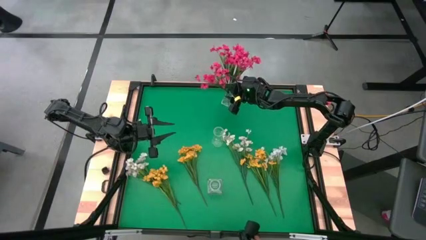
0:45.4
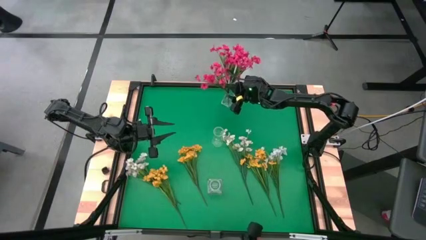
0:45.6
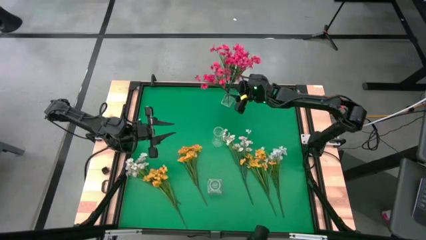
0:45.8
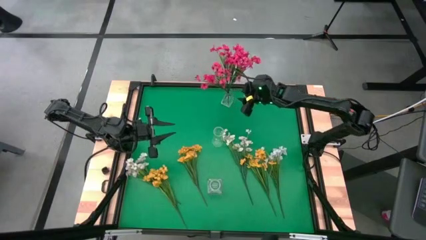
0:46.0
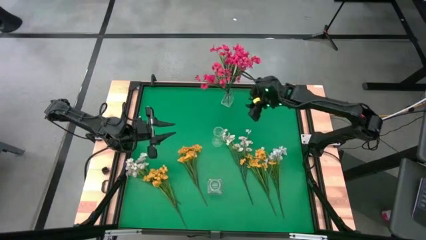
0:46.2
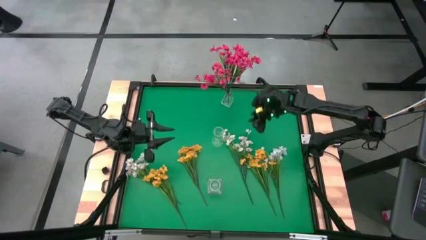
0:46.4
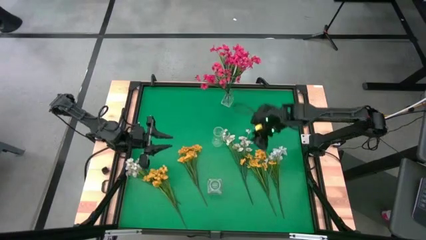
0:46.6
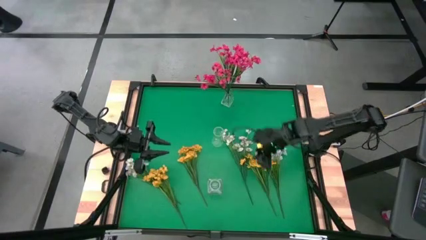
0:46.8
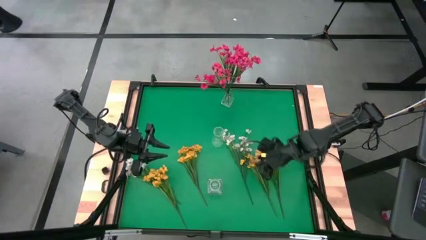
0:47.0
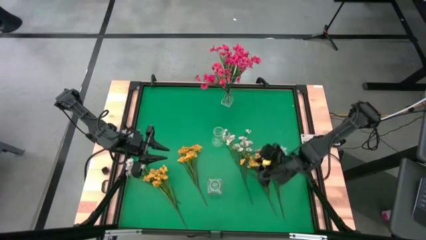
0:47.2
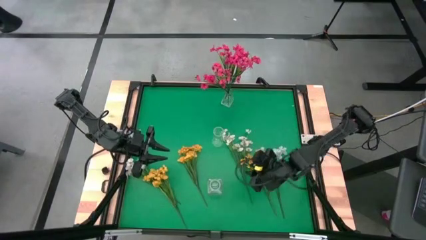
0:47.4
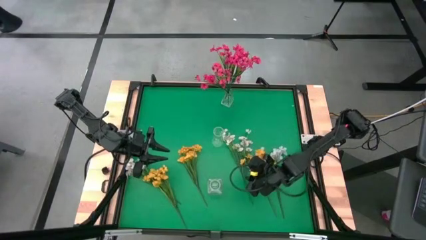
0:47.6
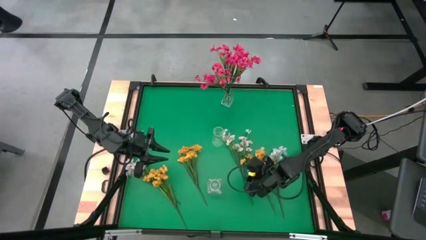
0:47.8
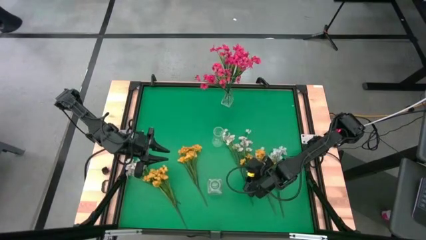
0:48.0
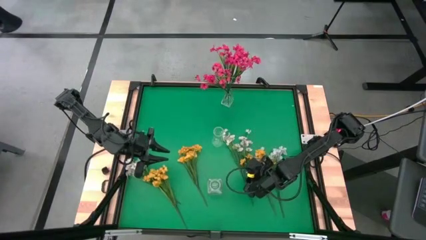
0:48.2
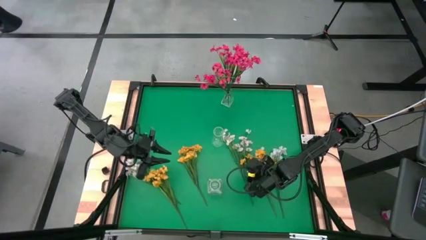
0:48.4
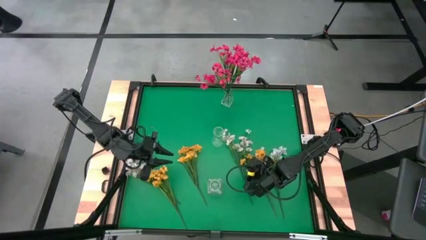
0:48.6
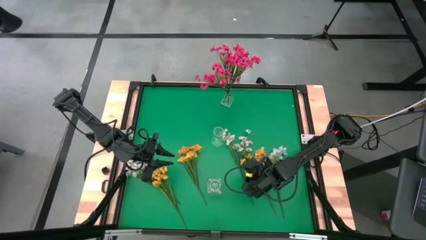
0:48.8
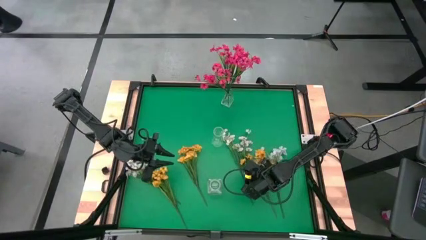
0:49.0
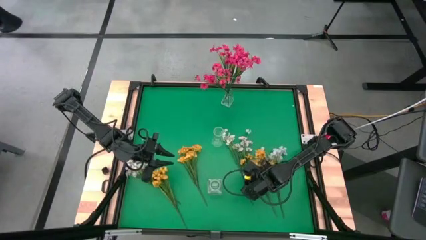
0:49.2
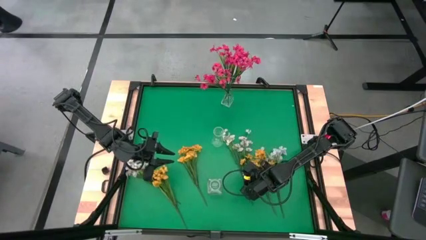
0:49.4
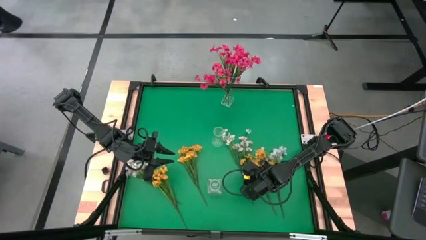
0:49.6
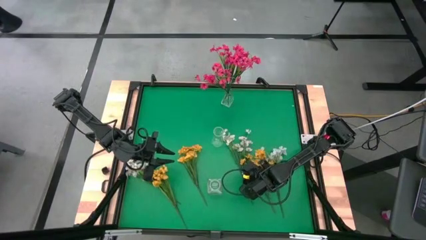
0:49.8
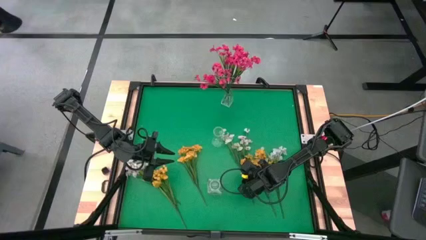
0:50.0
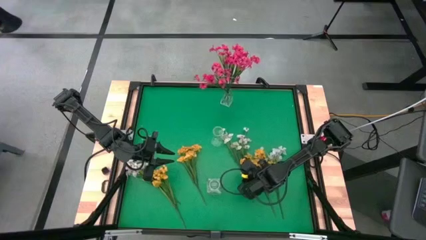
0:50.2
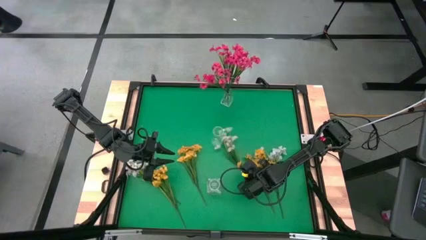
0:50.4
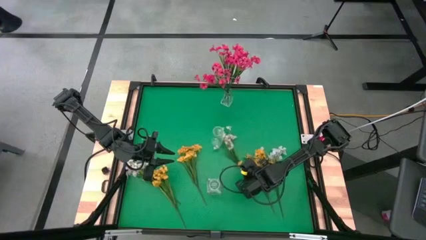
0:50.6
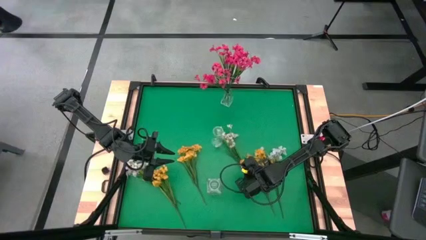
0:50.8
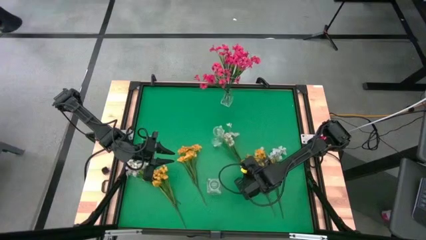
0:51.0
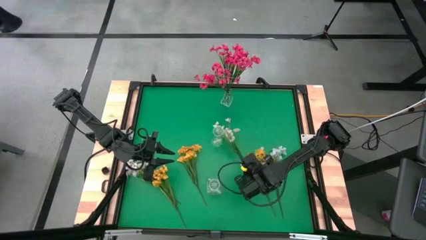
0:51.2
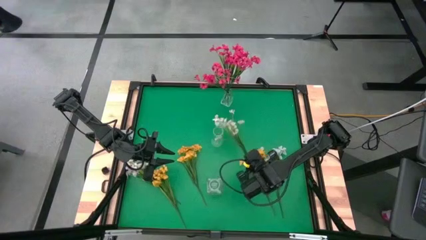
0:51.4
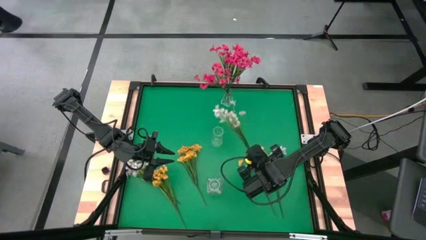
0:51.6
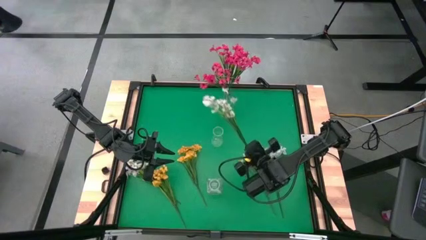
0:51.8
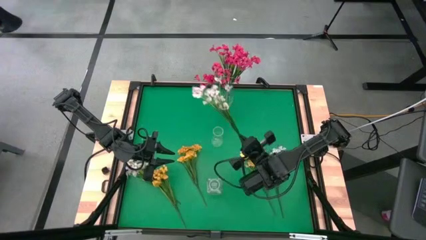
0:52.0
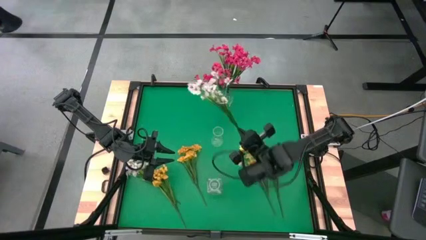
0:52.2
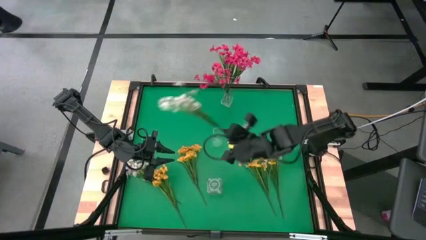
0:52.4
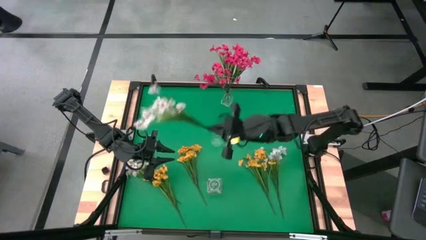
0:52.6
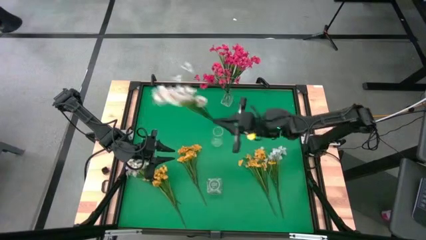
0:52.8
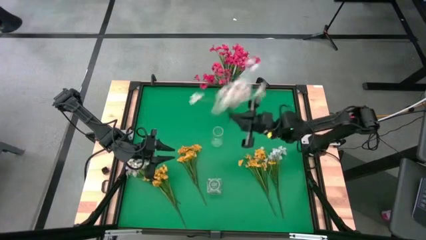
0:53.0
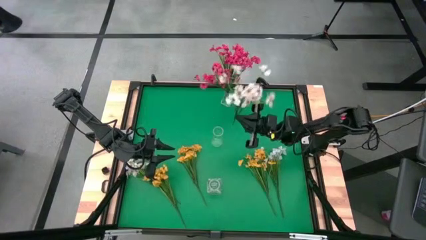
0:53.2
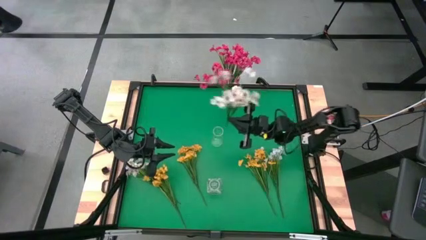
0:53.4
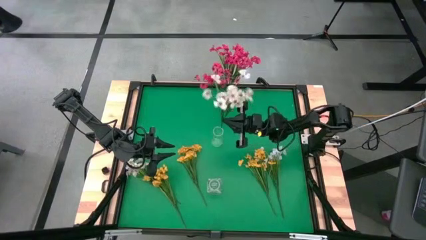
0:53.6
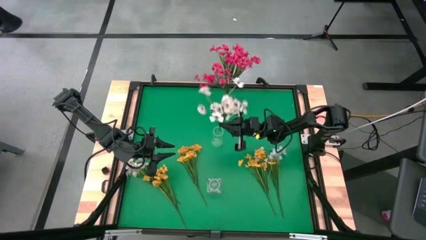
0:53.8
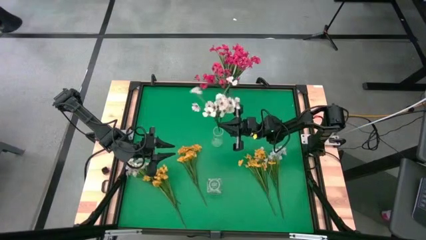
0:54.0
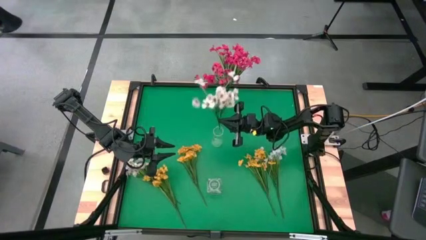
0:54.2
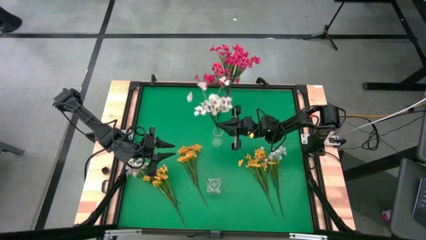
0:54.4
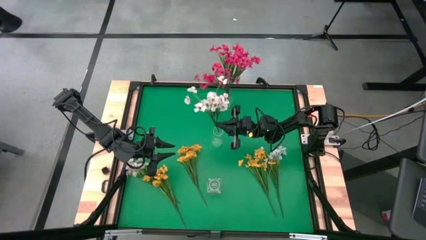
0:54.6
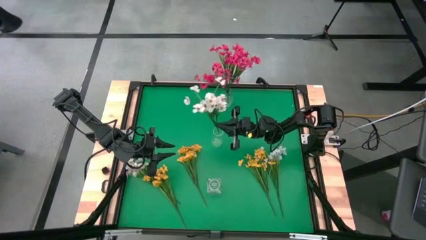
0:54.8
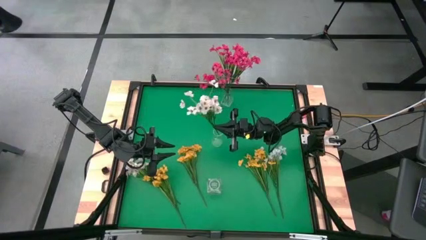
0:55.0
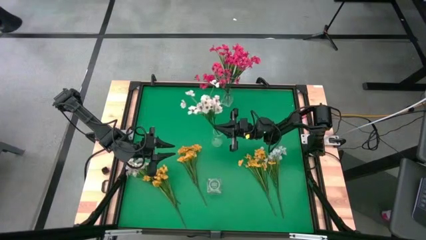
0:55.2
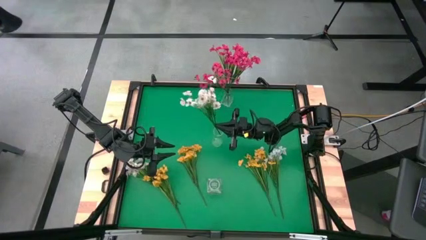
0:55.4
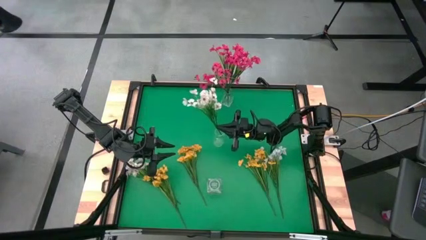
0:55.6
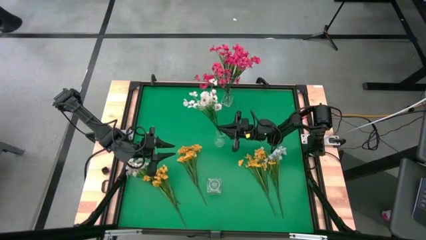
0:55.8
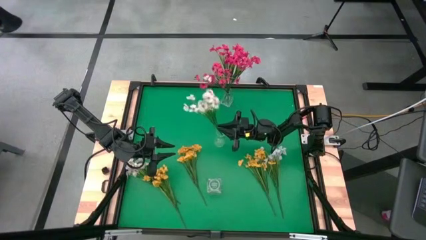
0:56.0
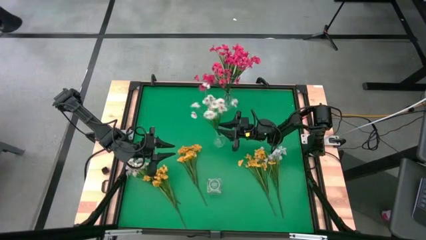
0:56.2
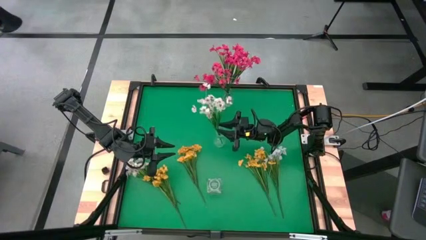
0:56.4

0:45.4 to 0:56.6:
Task: Sort flowers into vase by color
Put the middle white flowers into the middle transparent vase

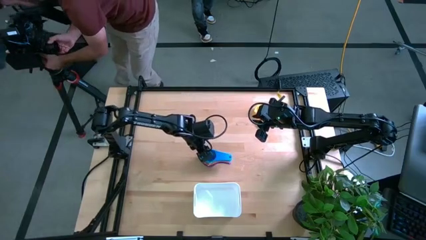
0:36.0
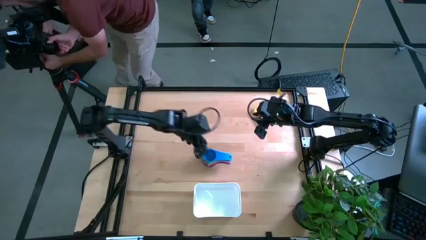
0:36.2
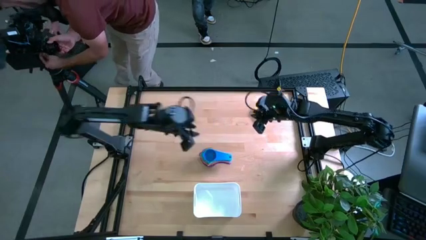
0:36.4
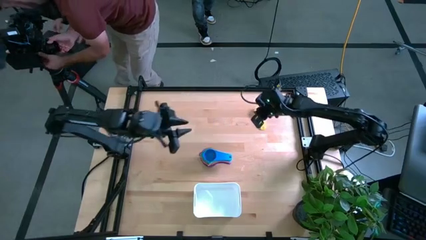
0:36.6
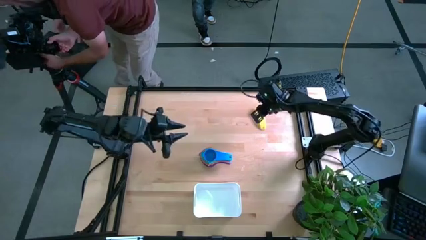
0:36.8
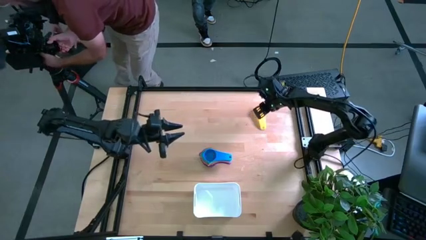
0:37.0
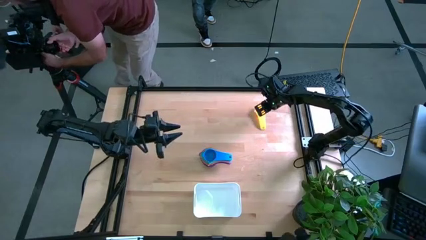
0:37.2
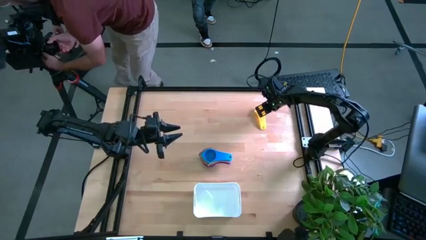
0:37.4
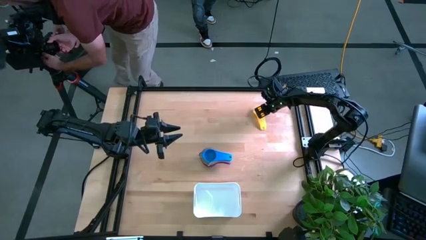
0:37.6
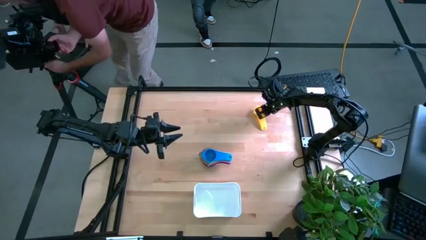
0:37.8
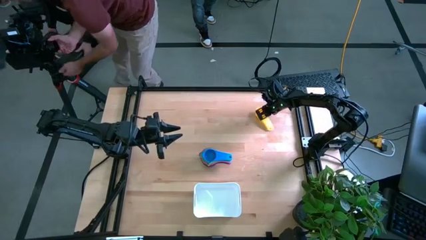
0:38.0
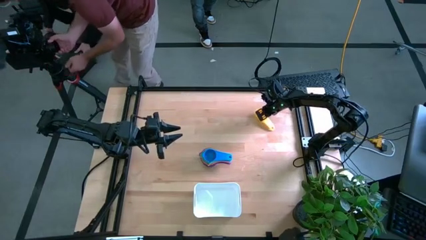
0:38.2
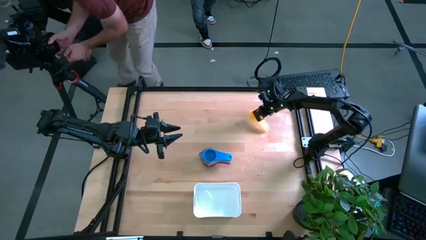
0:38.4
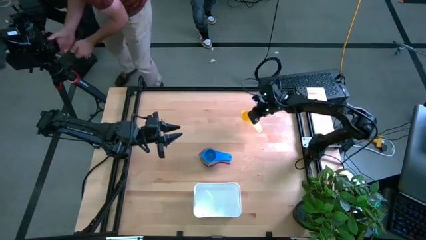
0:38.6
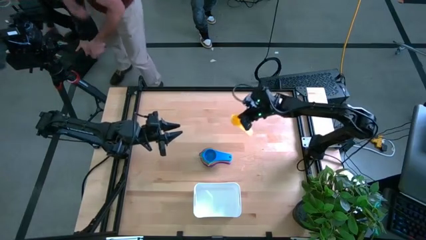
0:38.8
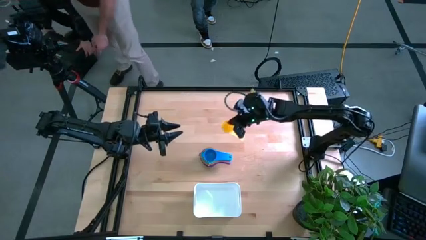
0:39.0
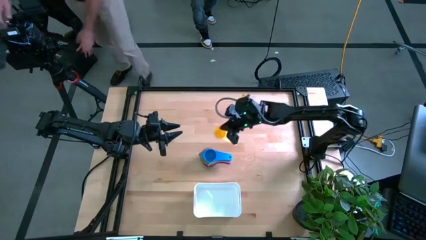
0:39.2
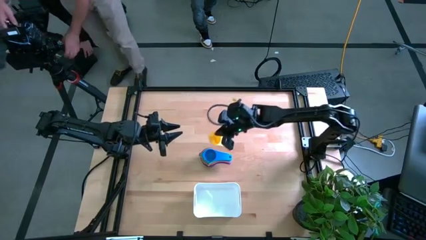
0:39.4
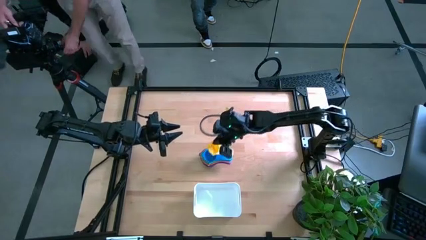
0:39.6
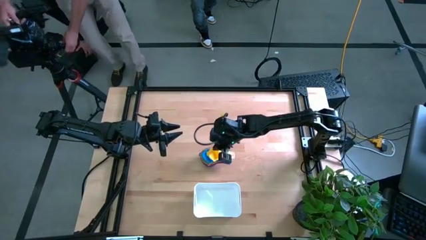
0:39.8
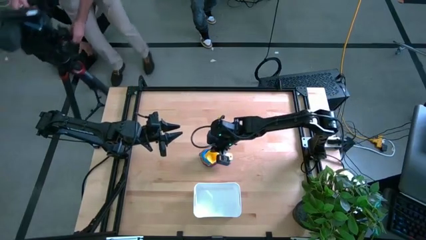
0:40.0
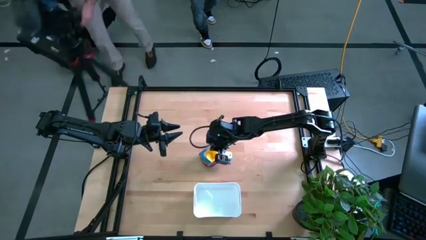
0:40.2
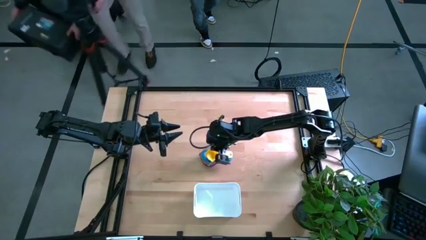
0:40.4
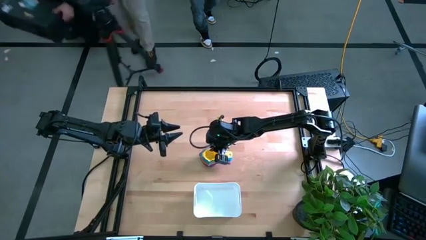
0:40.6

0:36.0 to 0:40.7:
Task: Nest measuring cups in basket
Stack the yellow measuring cup on top of the blue measuring cup

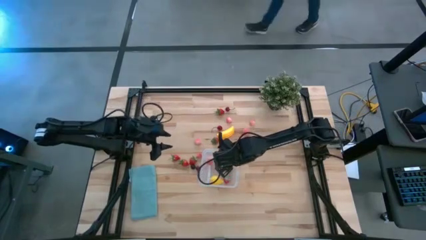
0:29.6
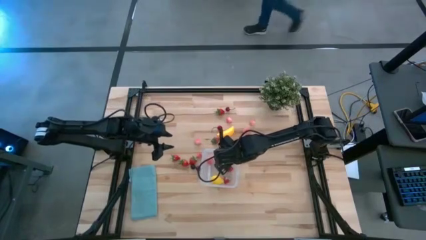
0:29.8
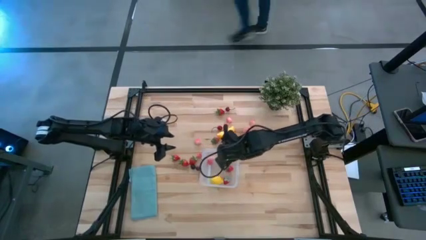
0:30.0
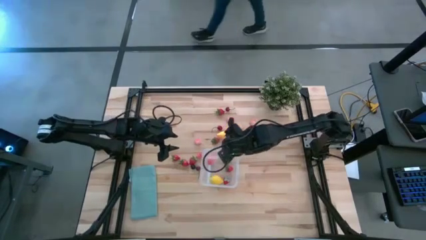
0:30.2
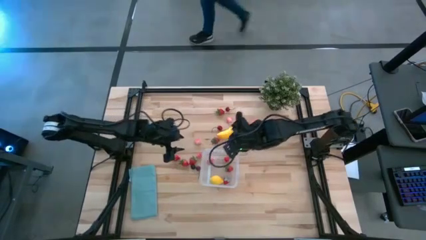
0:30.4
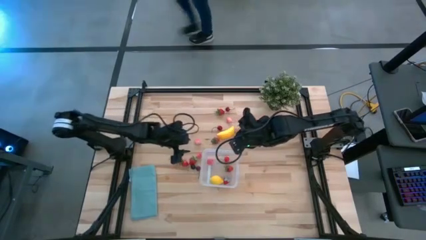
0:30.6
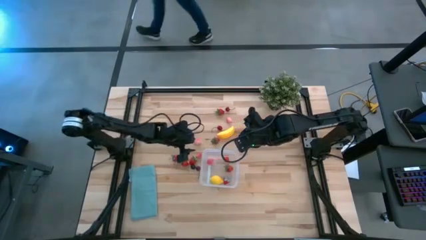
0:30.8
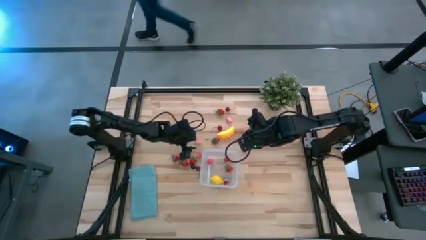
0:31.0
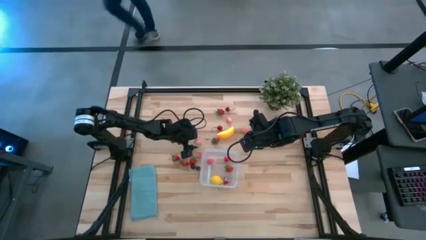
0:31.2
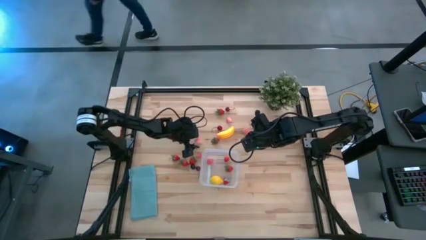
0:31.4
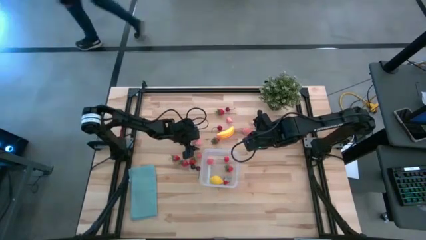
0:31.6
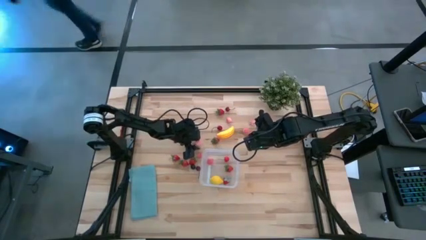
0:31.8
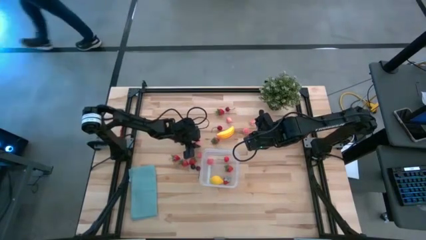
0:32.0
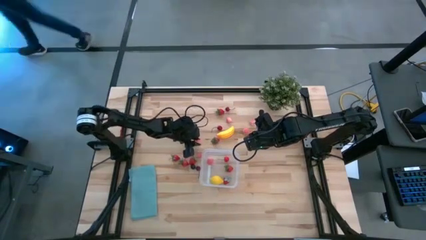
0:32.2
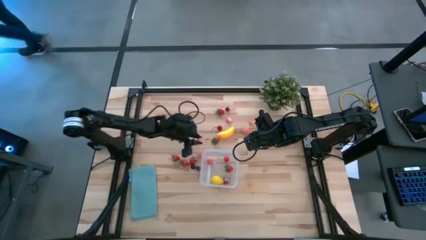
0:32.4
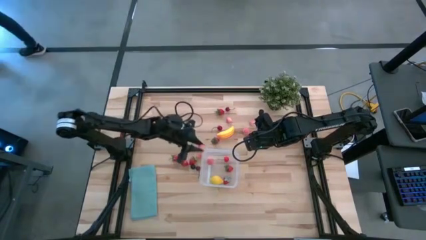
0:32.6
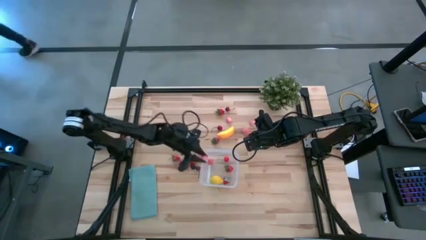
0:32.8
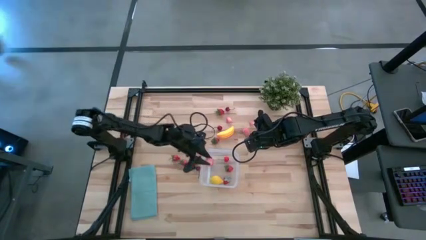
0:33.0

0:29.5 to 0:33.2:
Task: Pick and placing Produce into tupperware
Put the pink peach into the transparent container
